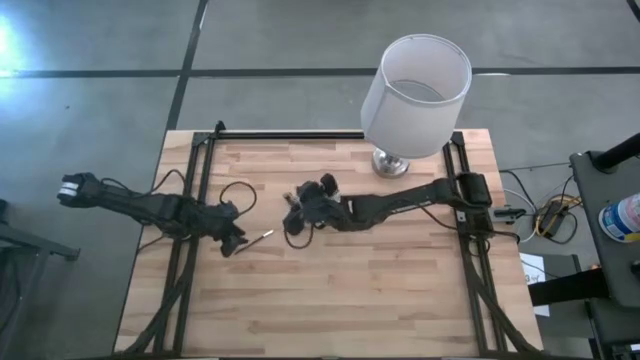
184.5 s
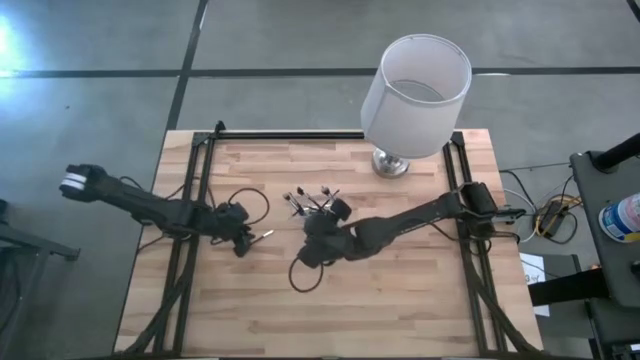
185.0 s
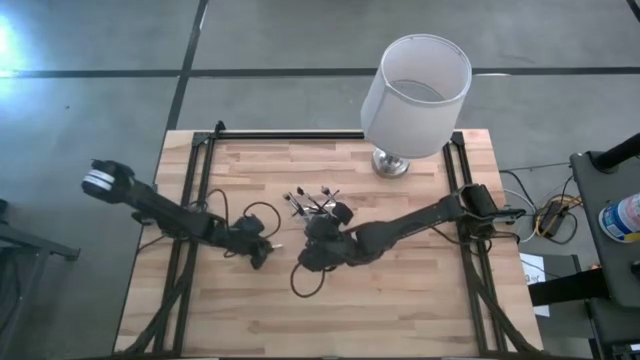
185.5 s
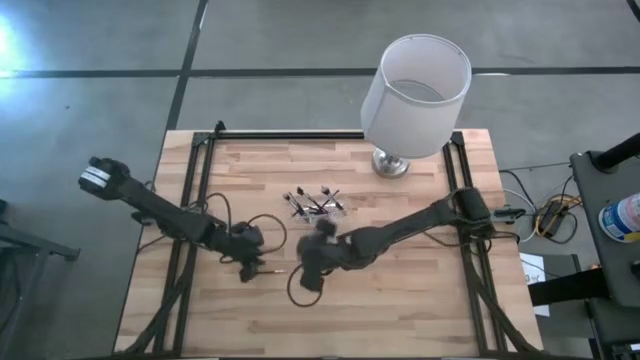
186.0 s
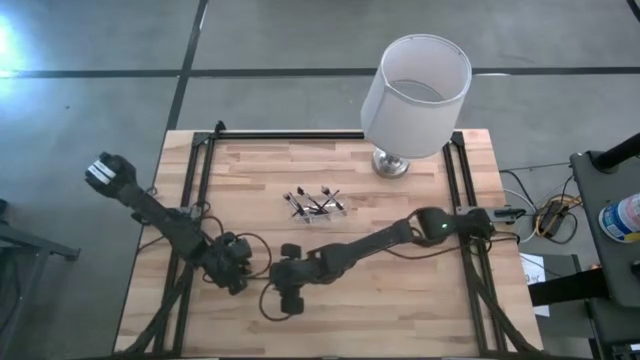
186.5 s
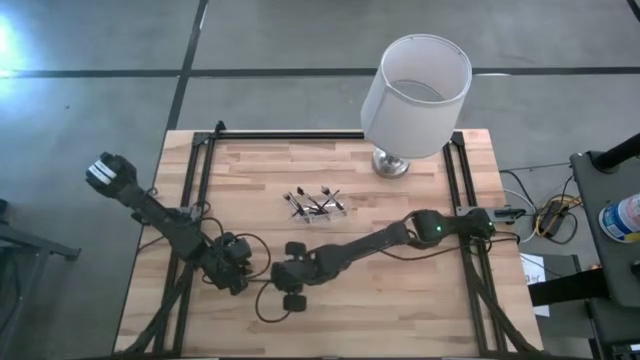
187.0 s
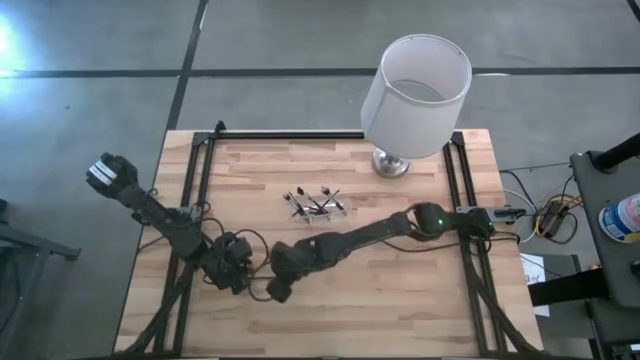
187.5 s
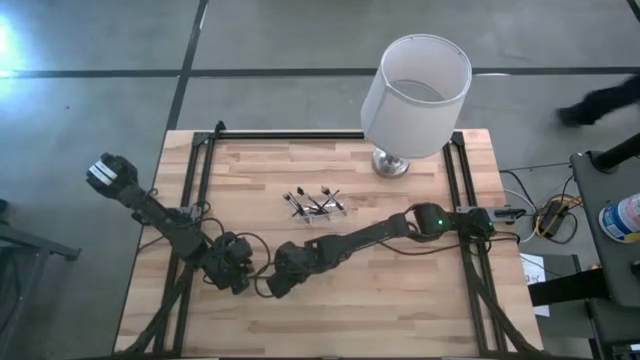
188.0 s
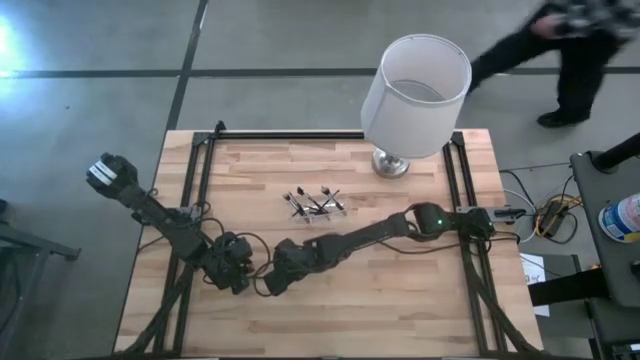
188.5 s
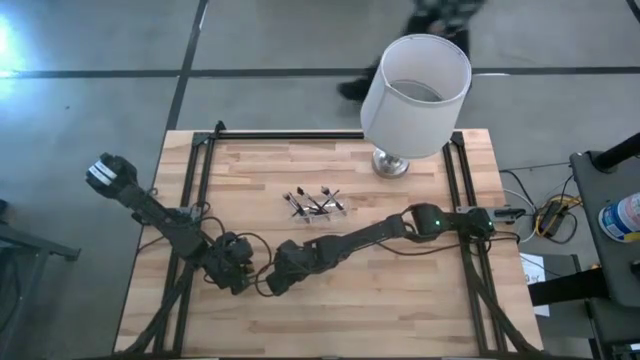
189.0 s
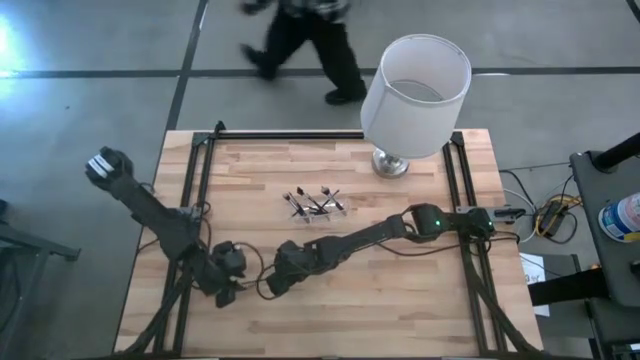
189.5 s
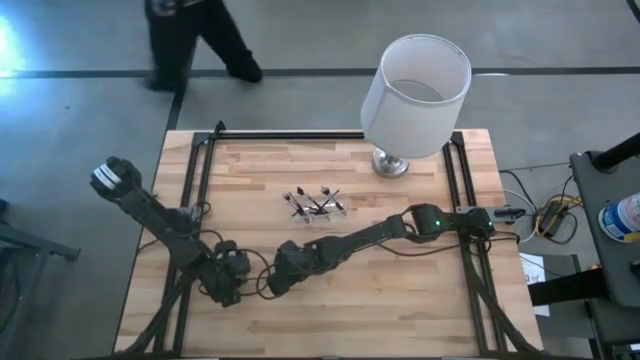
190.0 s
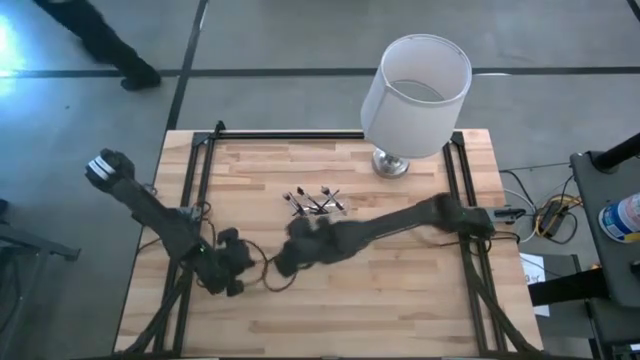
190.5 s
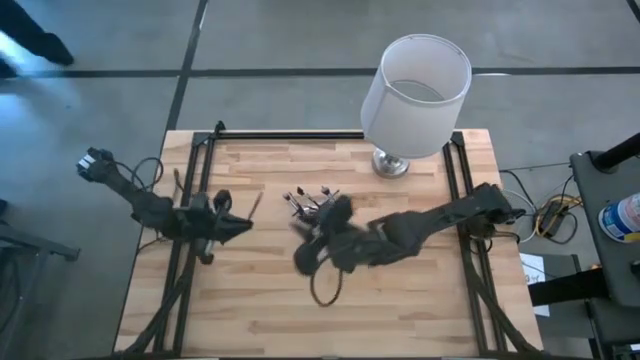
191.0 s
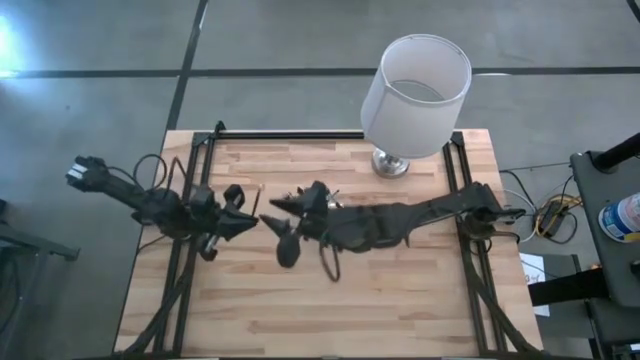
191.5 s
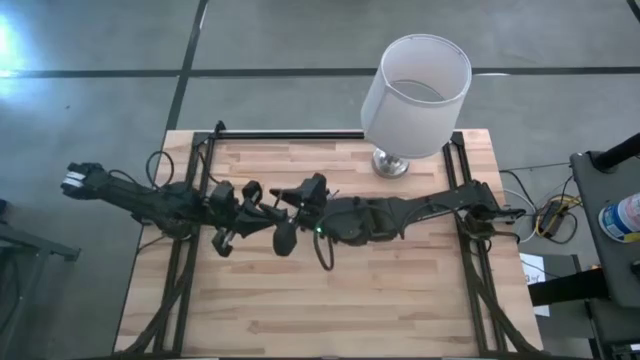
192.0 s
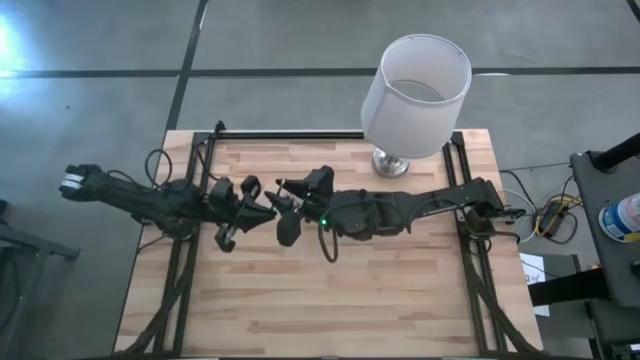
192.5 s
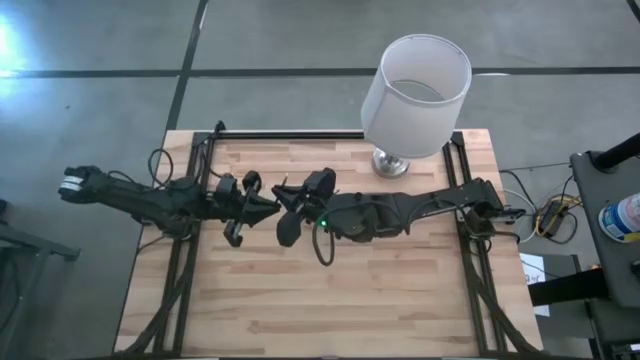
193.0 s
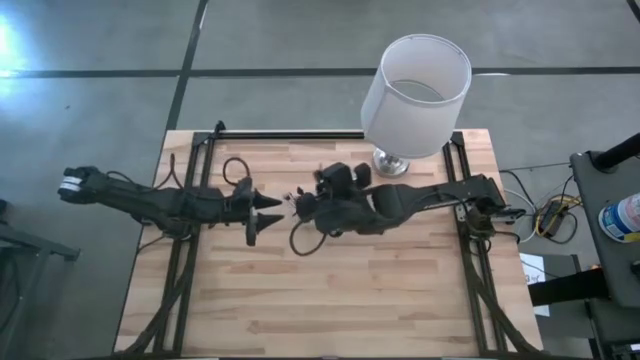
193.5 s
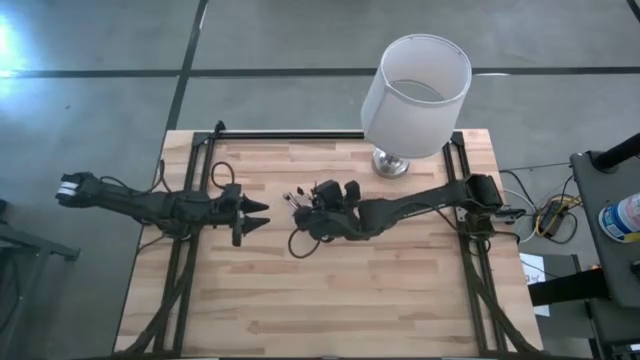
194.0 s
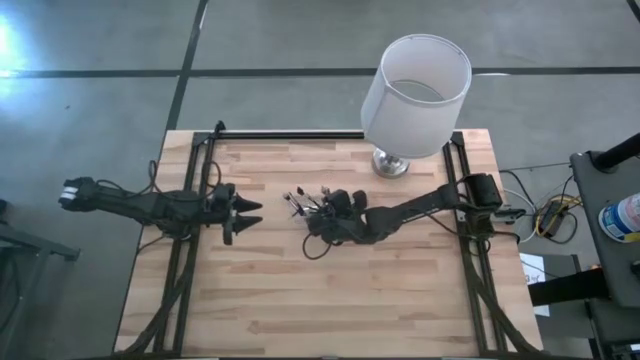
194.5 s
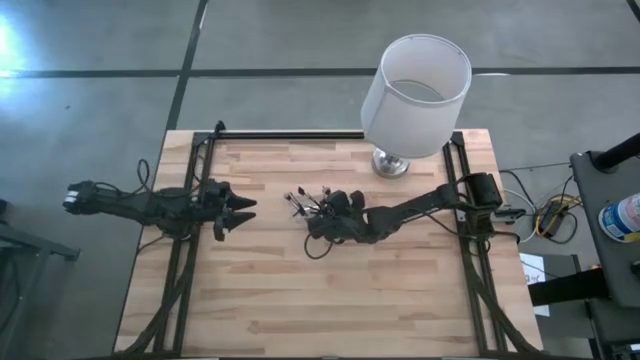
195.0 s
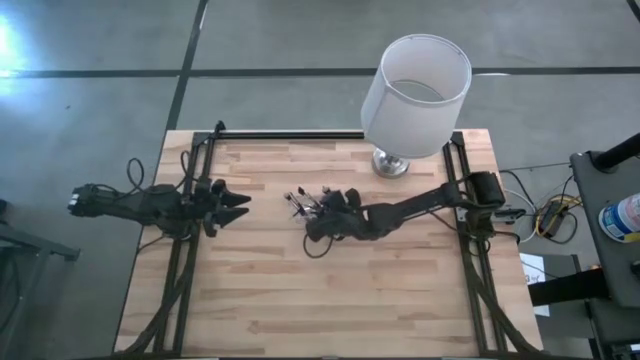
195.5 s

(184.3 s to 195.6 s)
Task: Put items in baskets/containers
Put the eyeshadow brush into the transparent organizer

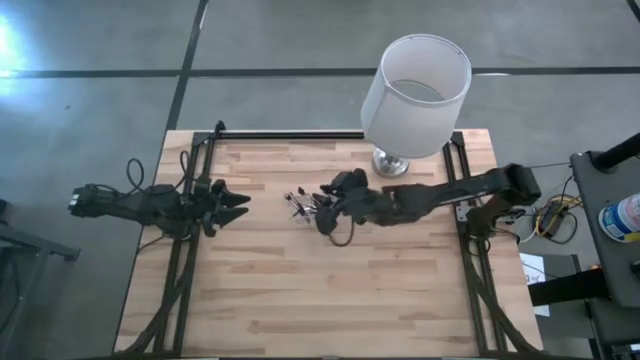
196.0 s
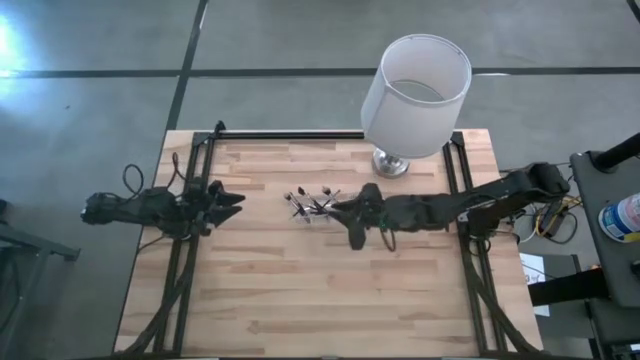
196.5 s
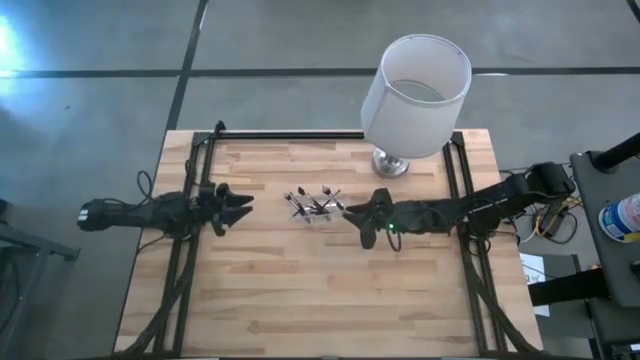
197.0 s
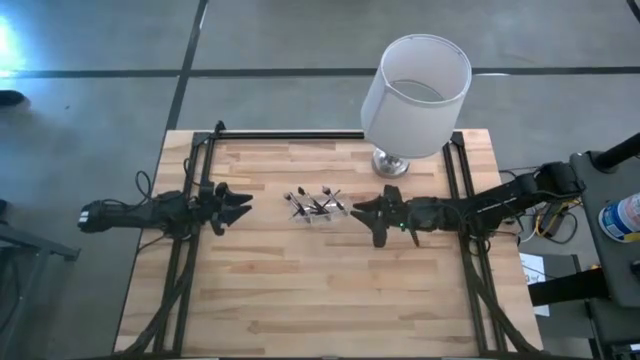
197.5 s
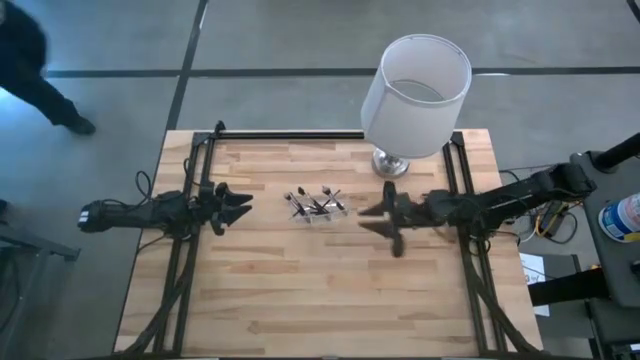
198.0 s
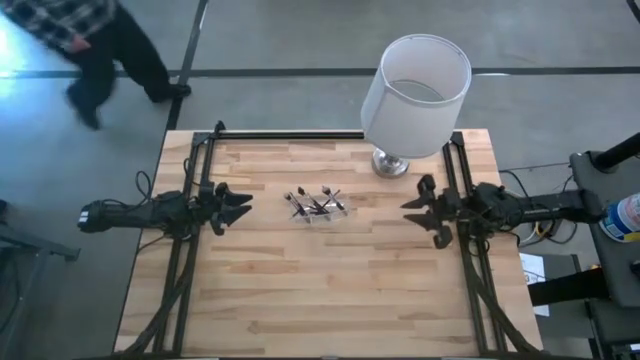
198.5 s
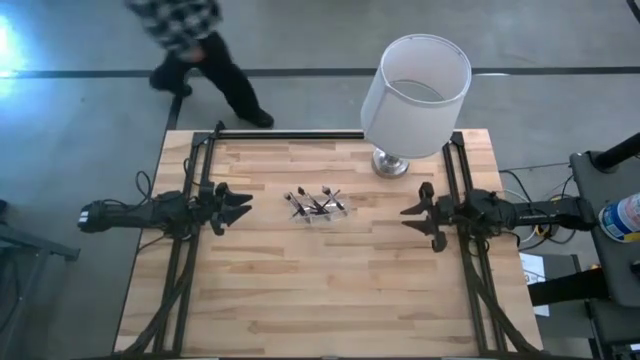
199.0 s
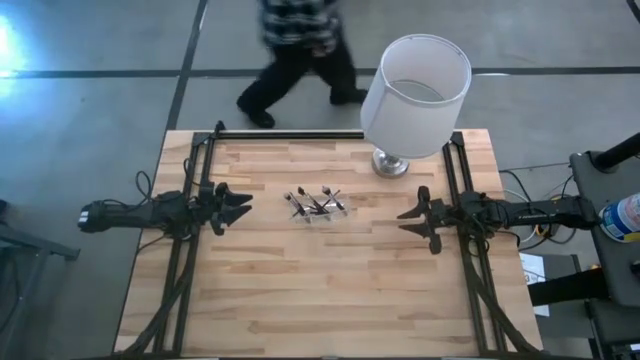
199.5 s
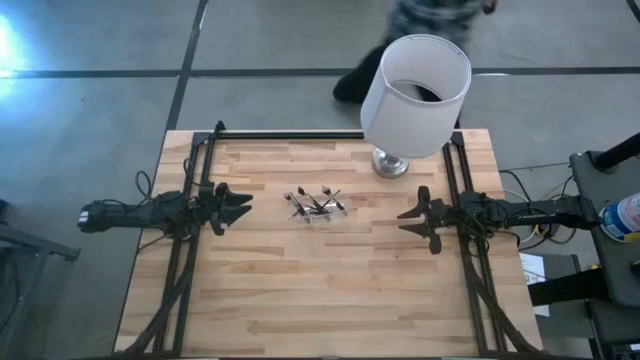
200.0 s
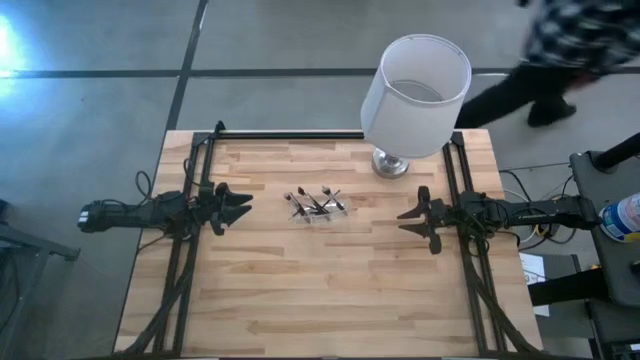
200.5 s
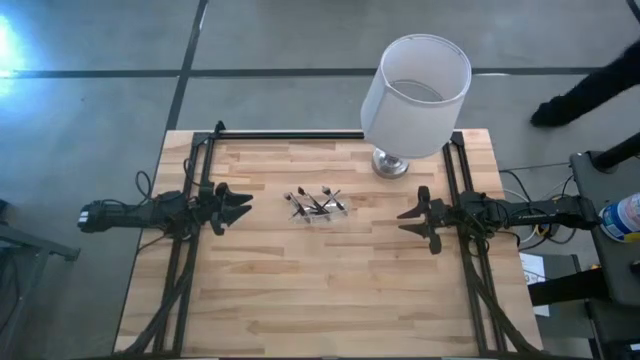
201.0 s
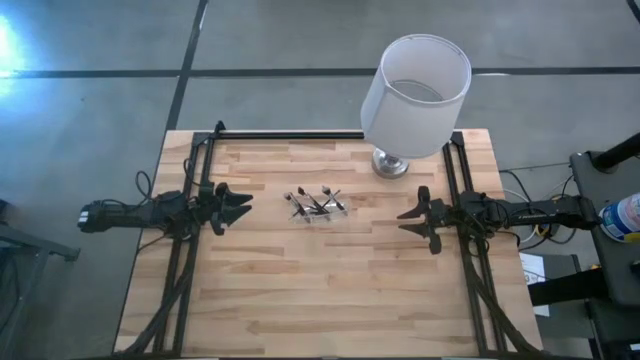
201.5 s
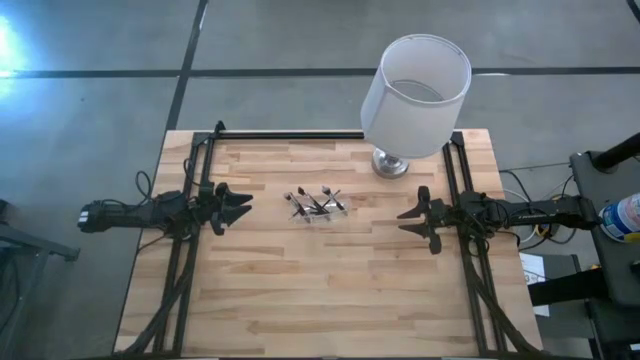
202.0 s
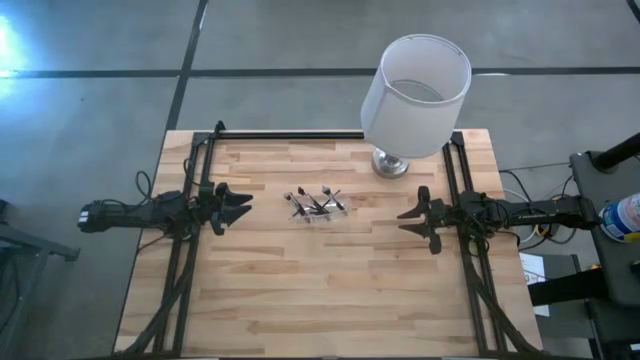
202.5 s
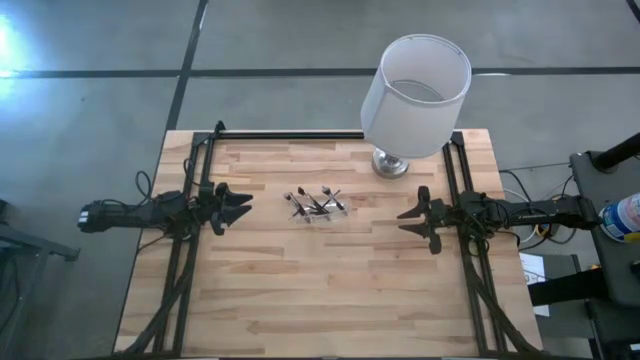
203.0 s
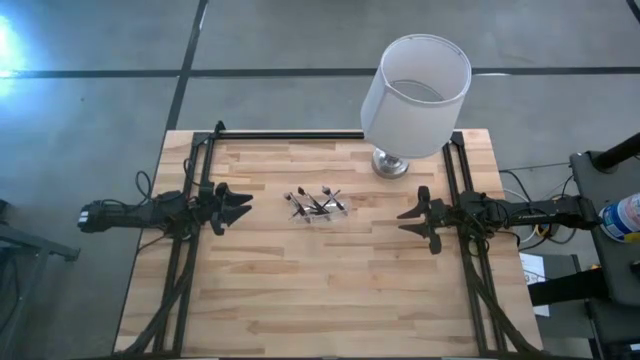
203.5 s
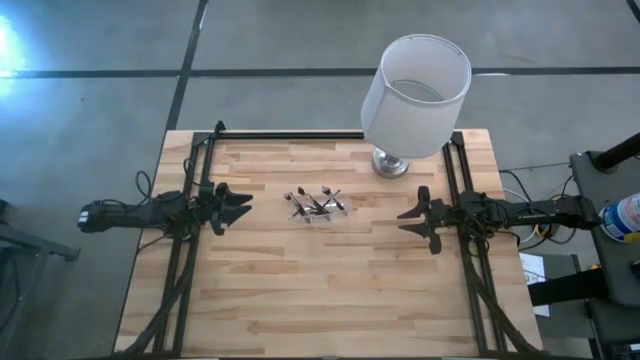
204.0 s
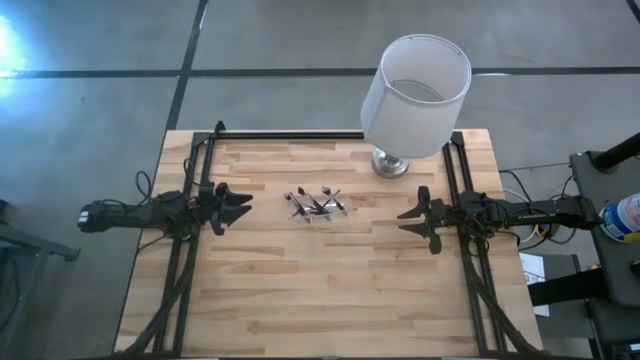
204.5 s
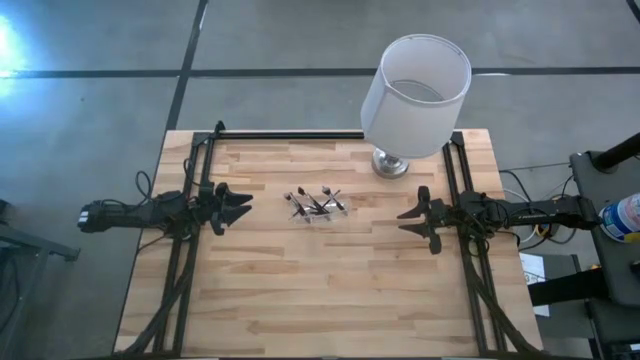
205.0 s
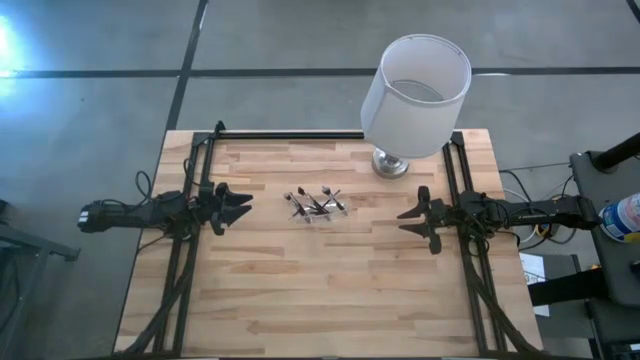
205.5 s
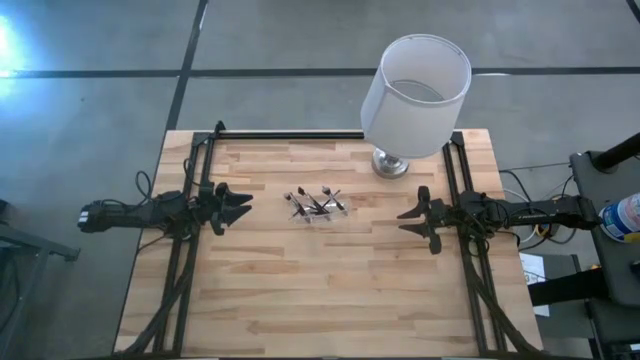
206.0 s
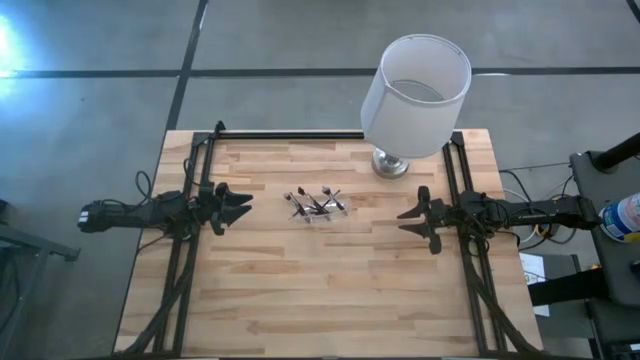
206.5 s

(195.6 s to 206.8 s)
Return to Home Position
